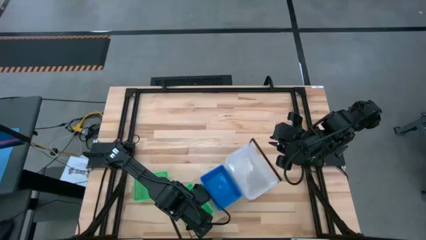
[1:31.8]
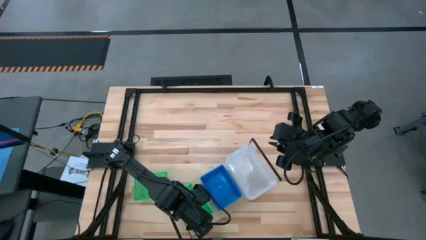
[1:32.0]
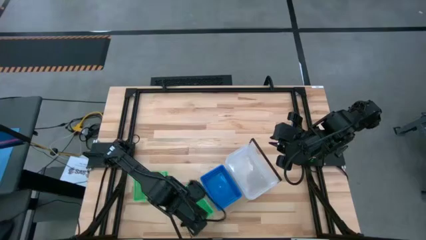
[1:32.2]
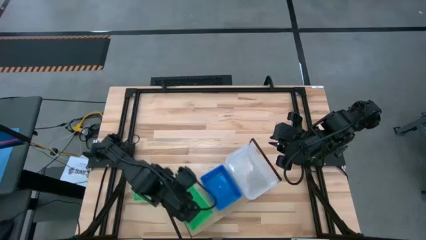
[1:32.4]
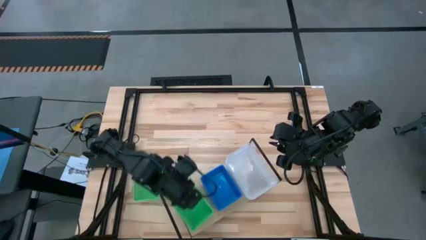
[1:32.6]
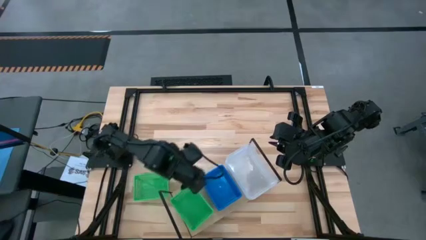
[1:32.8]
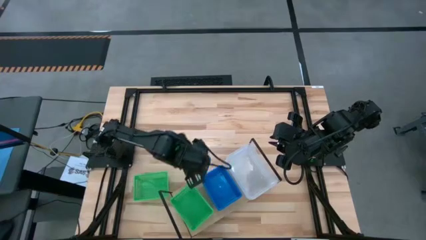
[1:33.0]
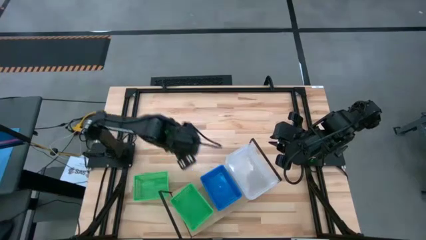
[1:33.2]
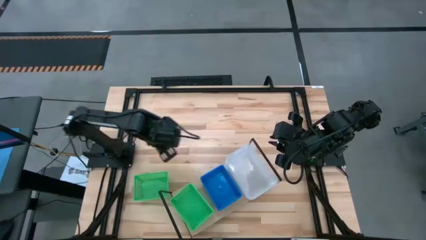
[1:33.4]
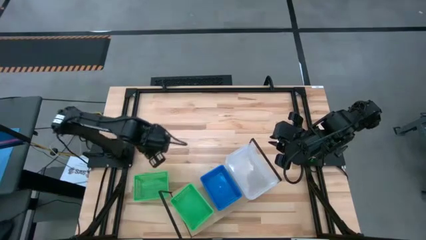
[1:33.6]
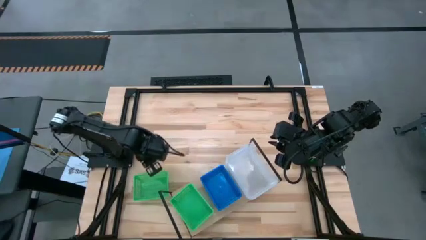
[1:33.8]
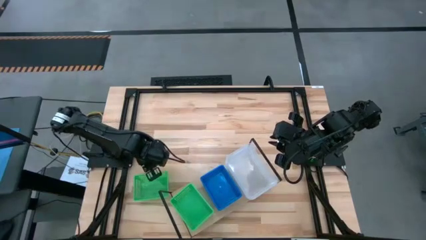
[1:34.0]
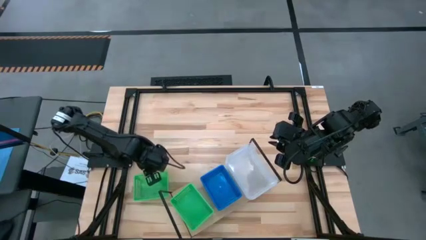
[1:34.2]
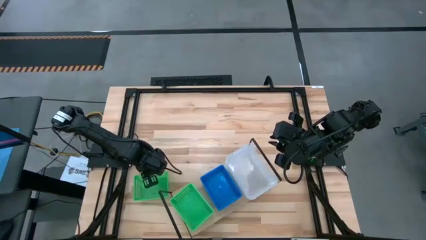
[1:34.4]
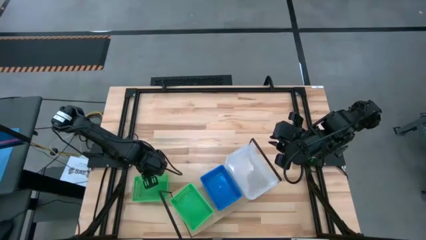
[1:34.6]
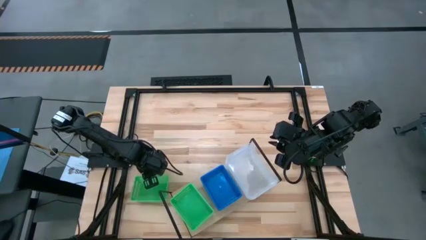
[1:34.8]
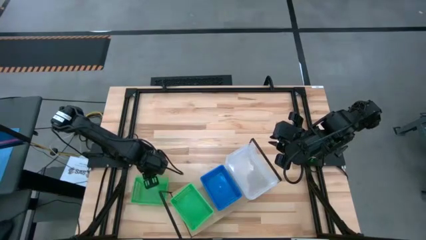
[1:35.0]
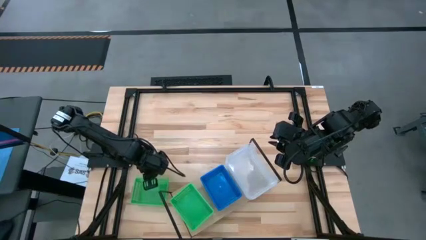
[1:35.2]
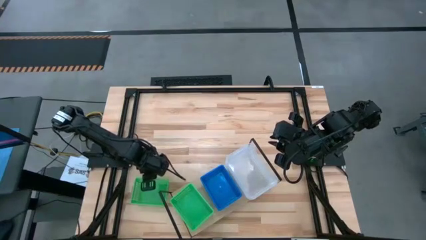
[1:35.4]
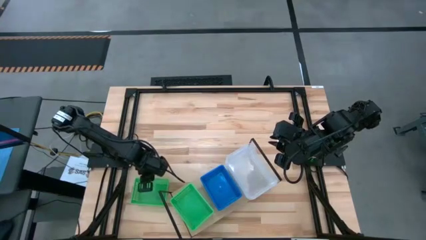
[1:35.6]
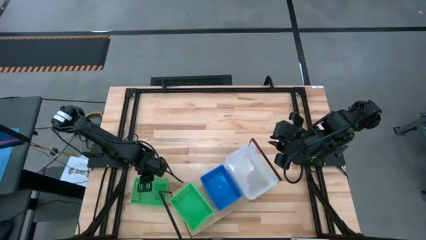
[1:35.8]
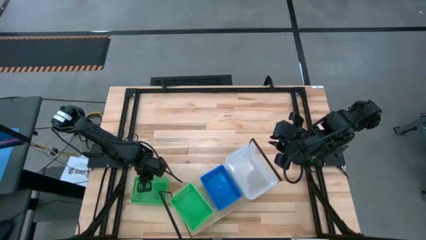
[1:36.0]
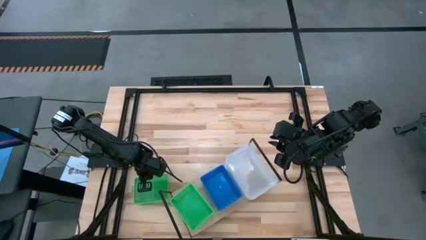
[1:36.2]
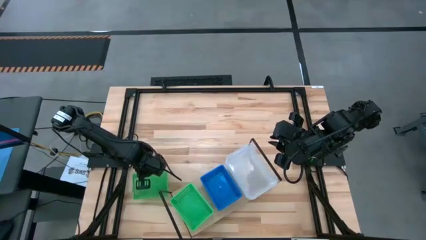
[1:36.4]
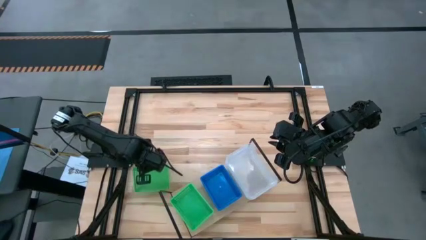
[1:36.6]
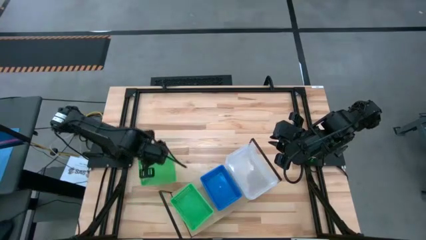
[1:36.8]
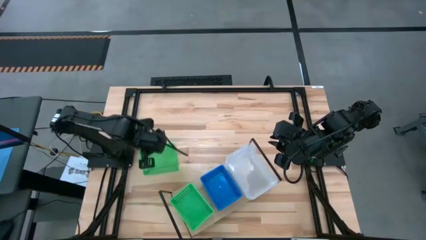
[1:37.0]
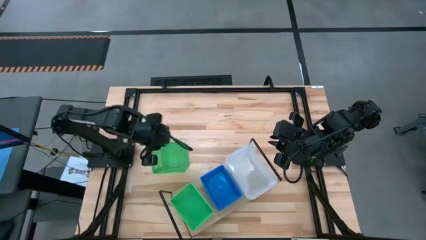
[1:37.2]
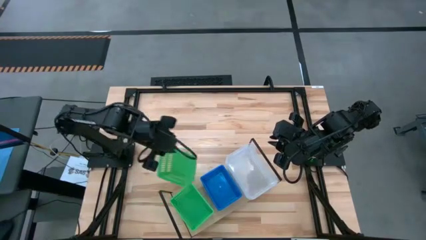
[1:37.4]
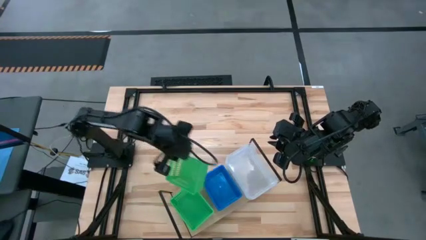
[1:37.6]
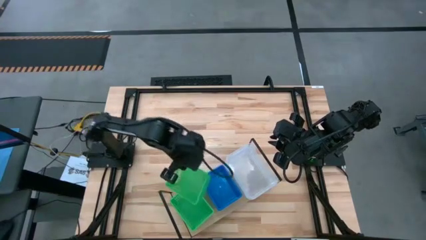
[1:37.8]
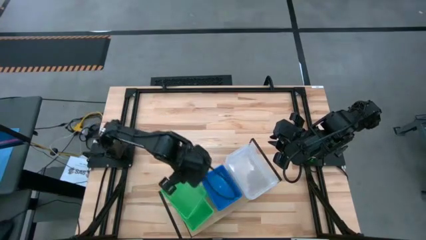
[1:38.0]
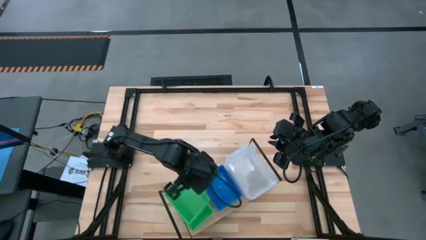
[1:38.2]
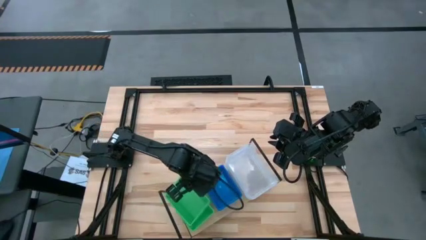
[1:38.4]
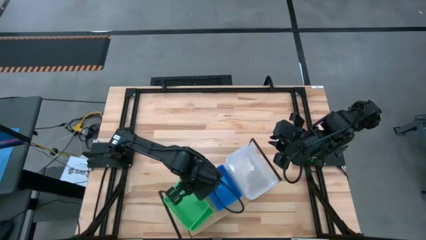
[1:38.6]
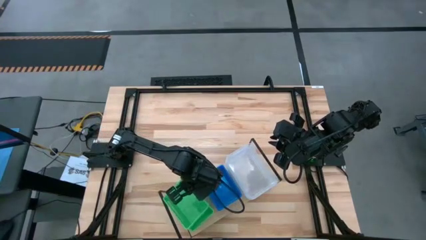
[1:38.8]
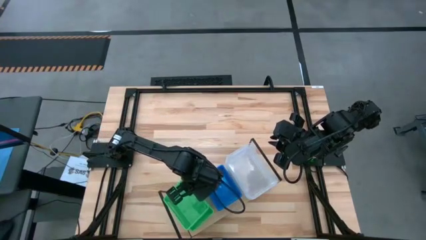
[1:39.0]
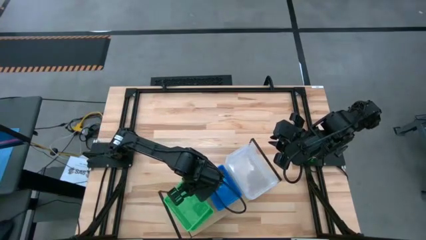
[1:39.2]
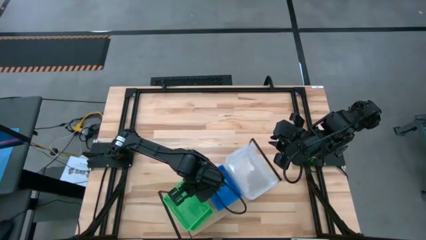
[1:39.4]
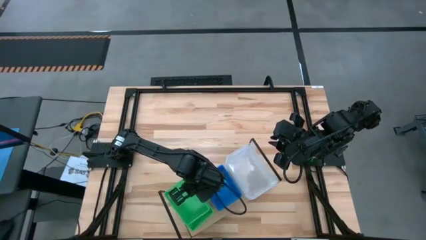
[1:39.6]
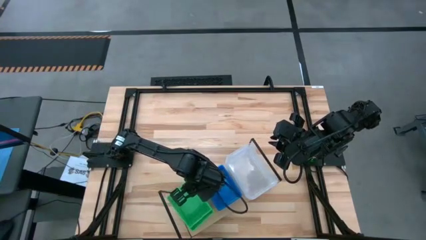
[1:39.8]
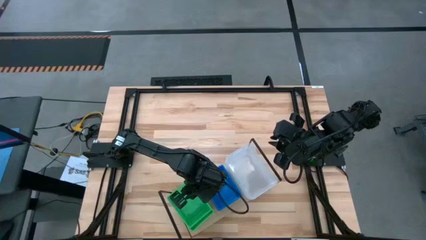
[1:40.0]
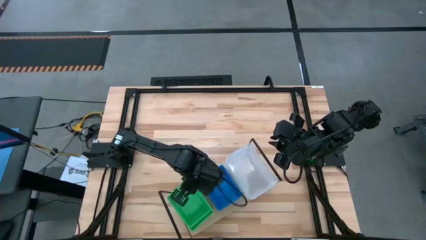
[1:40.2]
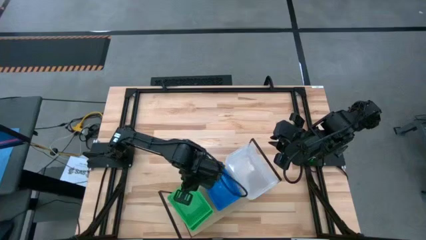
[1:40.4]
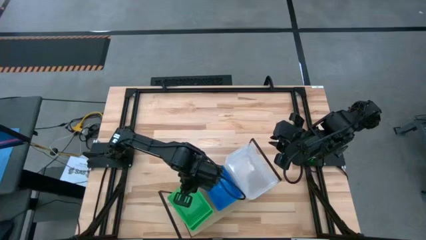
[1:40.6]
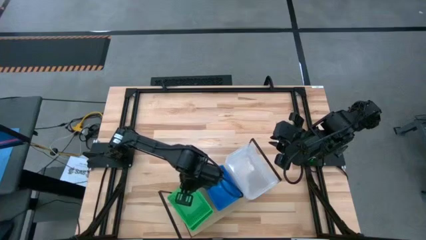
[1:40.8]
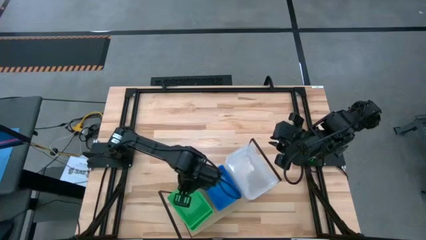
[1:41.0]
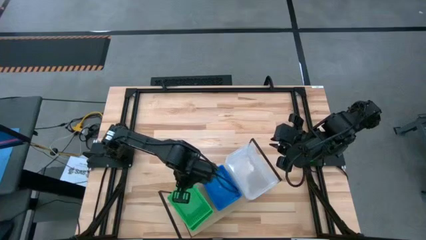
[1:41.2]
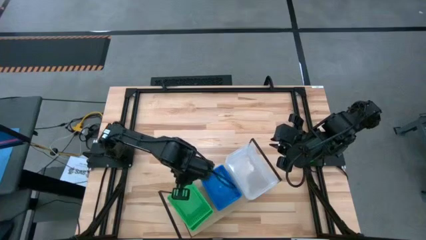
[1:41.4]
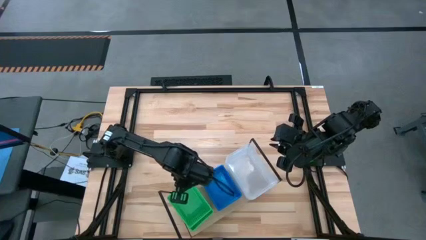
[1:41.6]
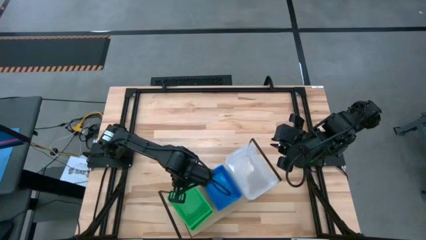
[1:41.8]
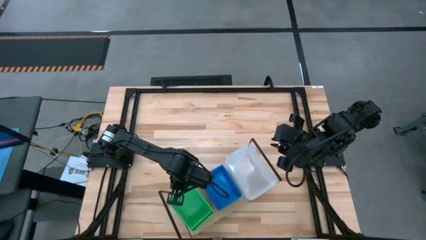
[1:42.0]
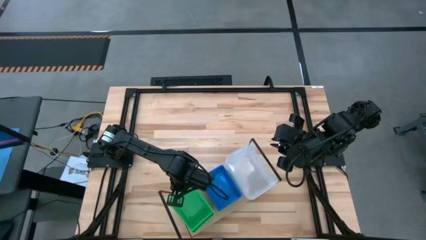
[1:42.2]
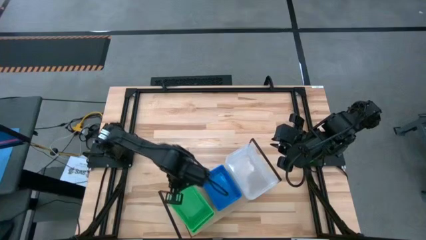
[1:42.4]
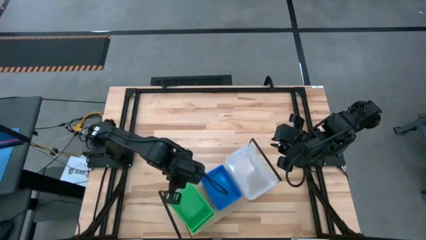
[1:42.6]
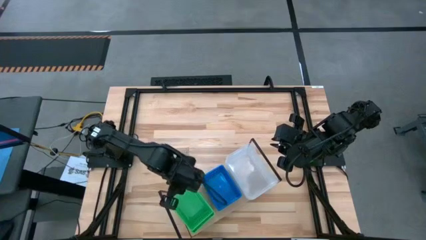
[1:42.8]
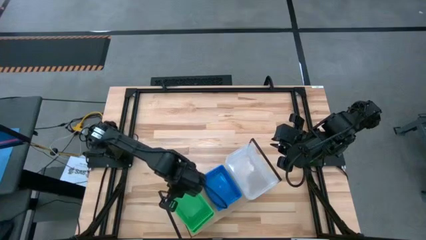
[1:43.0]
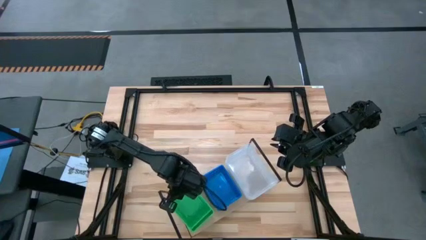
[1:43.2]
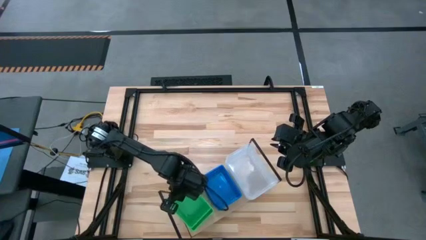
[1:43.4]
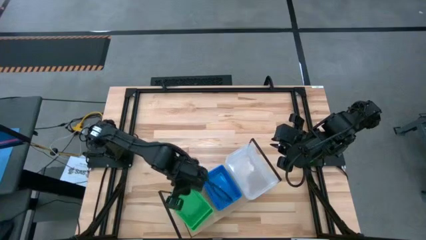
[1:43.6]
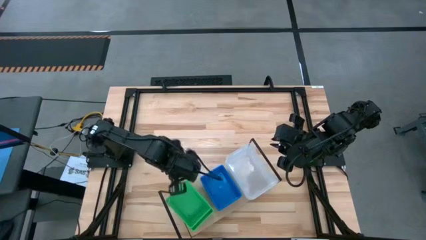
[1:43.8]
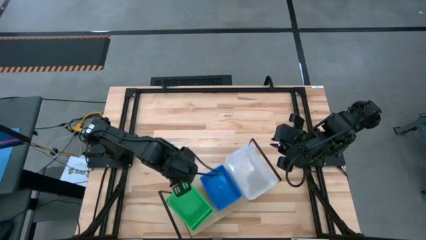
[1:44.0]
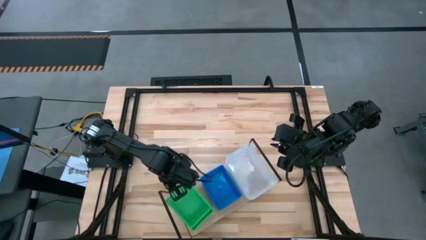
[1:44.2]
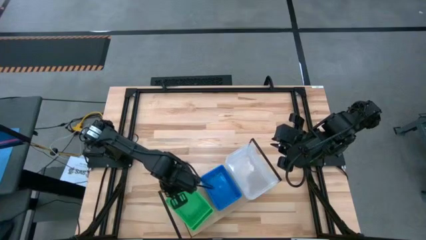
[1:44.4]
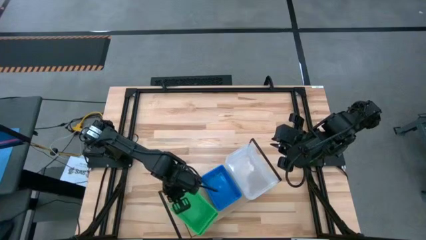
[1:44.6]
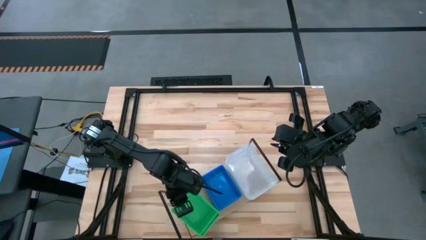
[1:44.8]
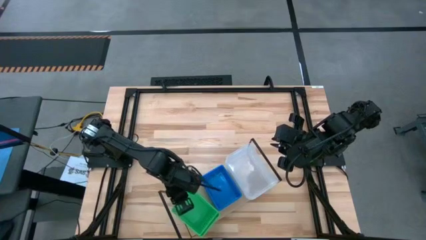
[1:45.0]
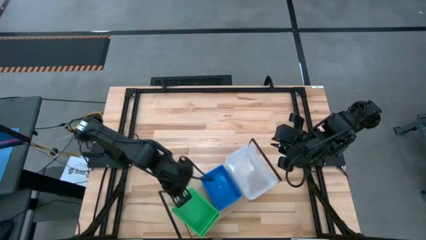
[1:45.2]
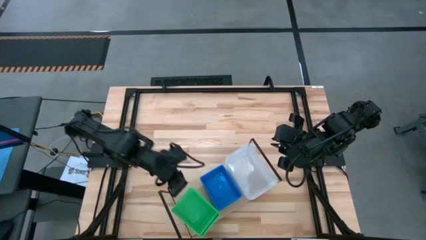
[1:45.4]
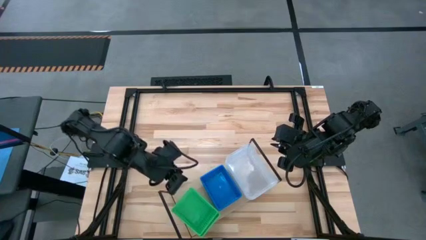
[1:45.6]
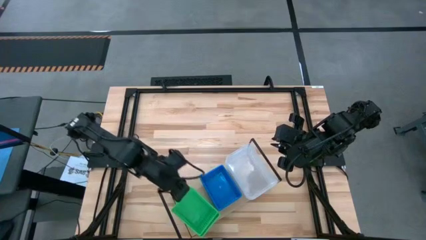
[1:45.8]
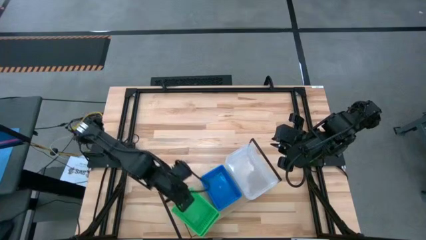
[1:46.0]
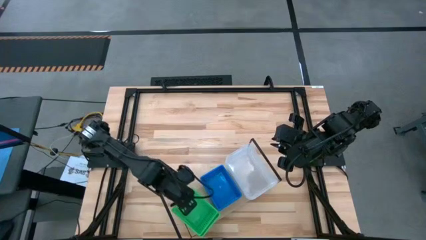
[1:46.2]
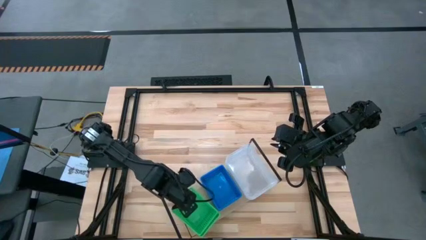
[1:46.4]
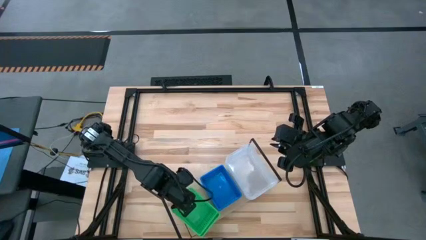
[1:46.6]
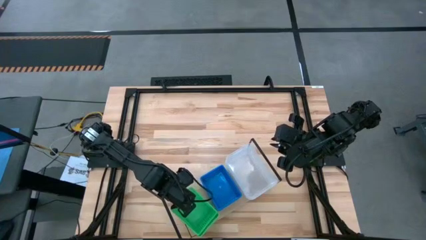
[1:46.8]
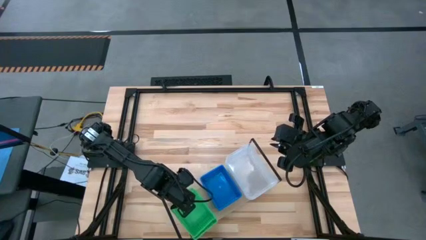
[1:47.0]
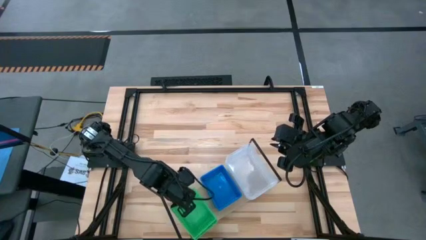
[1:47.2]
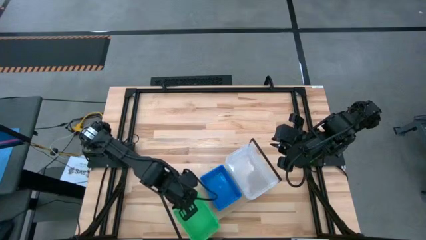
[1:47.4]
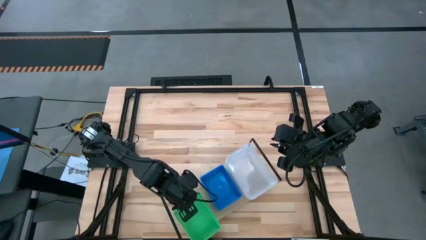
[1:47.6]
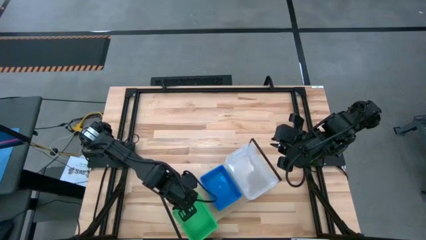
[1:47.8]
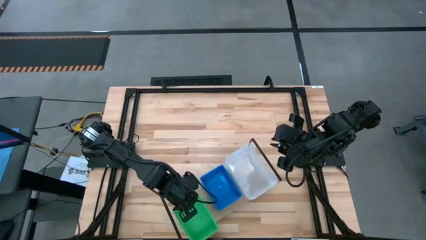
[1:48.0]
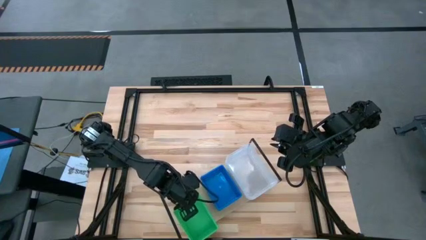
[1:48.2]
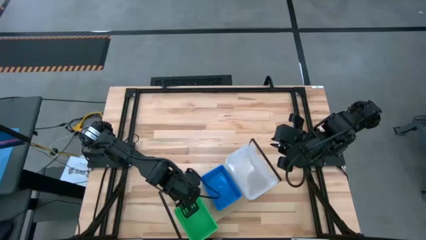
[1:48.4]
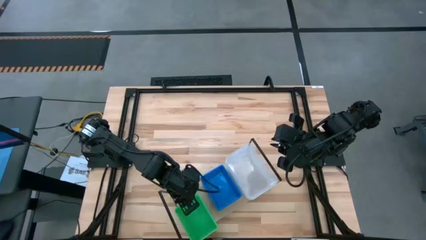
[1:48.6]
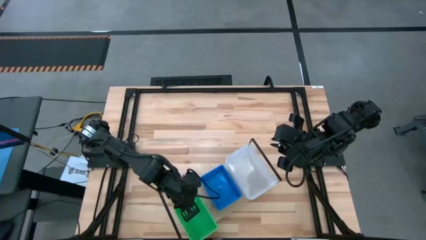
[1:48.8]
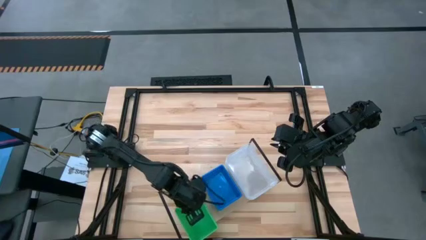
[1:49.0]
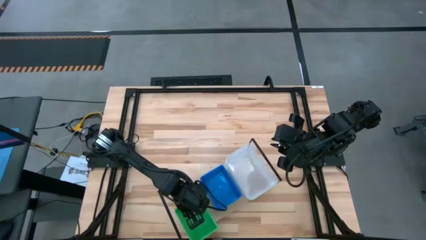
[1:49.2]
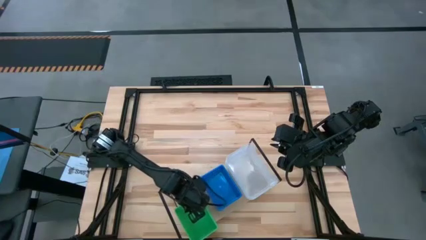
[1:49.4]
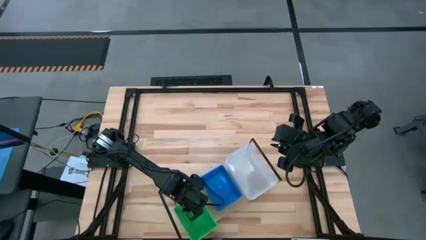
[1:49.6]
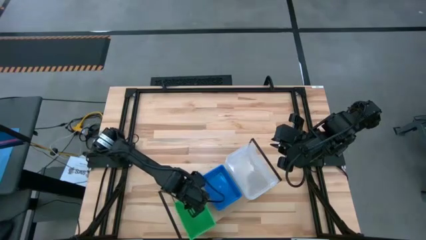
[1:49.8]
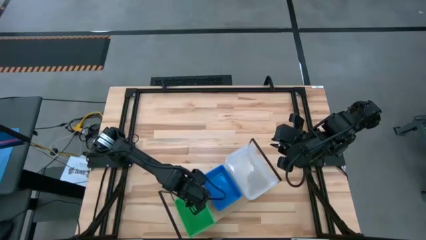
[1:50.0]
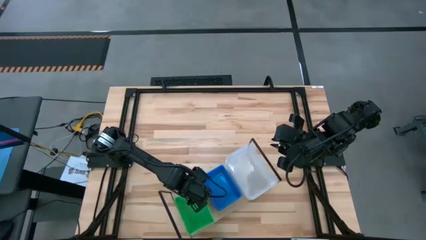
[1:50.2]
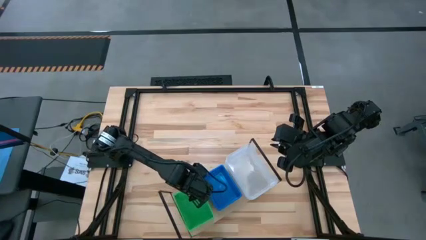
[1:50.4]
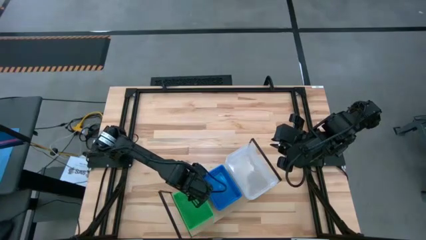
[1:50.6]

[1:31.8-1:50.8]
Task: Stack baskets on shelf by color
Stack the green basket on top of the other green baskets on the shelf
